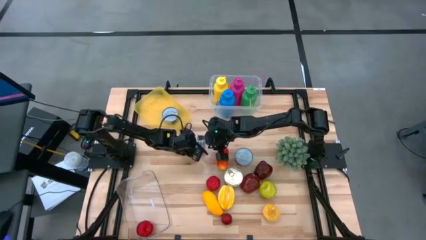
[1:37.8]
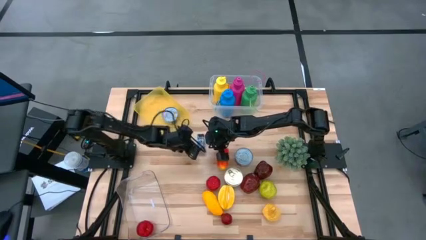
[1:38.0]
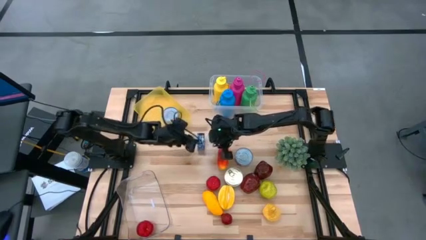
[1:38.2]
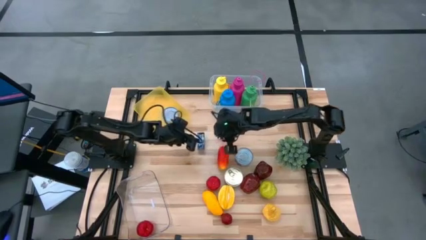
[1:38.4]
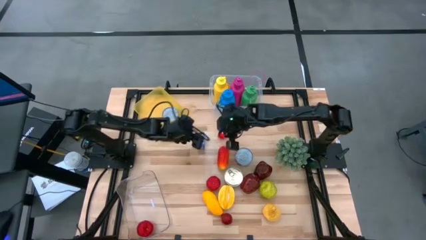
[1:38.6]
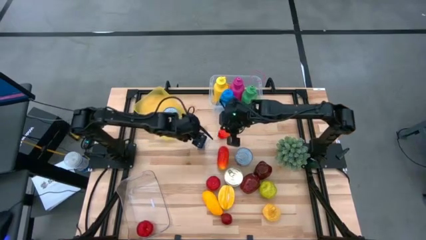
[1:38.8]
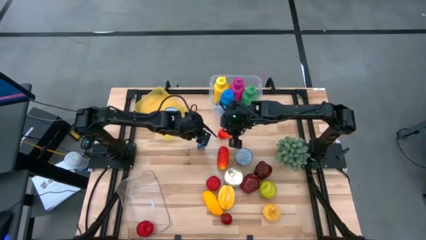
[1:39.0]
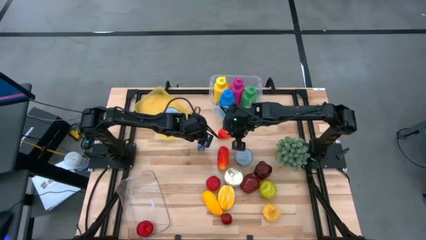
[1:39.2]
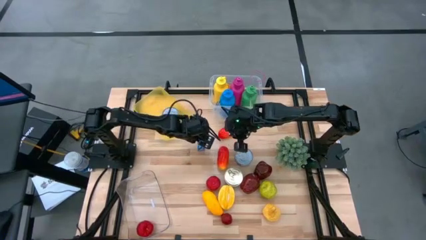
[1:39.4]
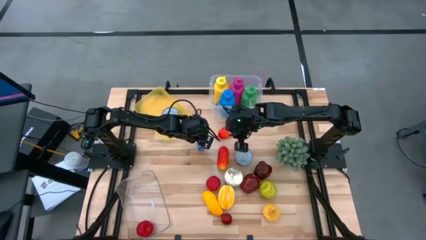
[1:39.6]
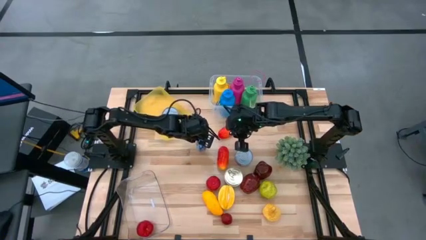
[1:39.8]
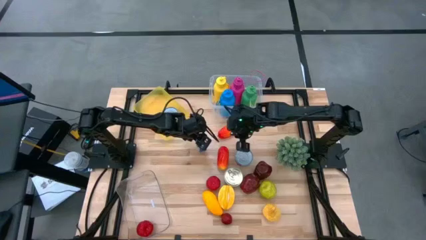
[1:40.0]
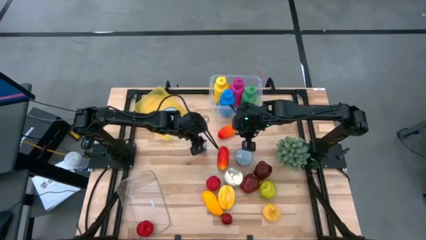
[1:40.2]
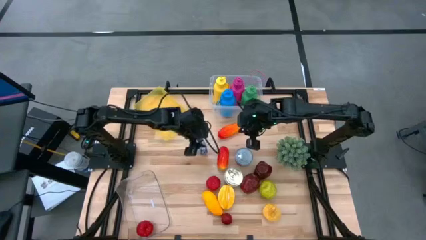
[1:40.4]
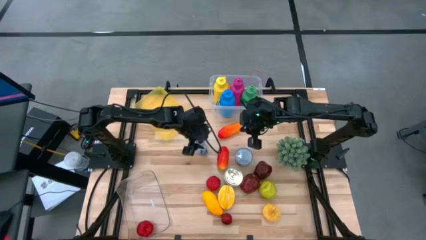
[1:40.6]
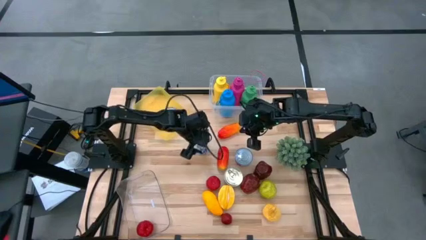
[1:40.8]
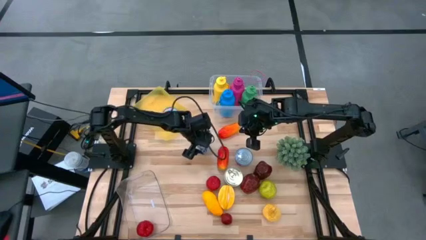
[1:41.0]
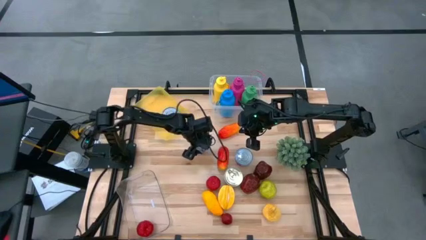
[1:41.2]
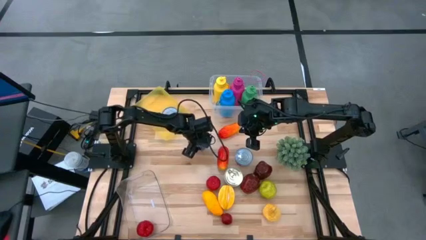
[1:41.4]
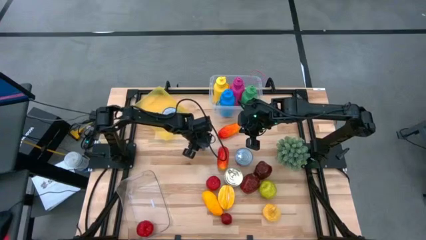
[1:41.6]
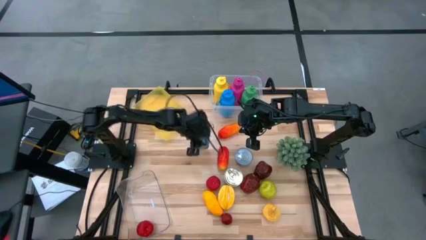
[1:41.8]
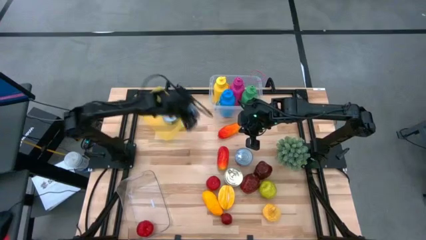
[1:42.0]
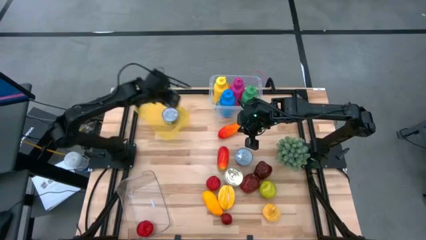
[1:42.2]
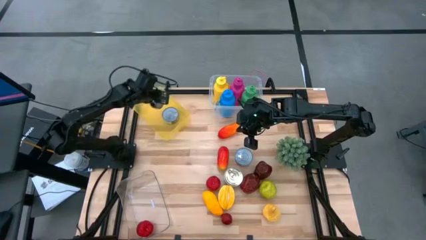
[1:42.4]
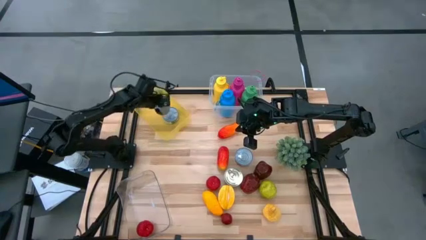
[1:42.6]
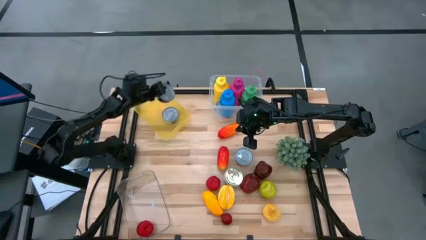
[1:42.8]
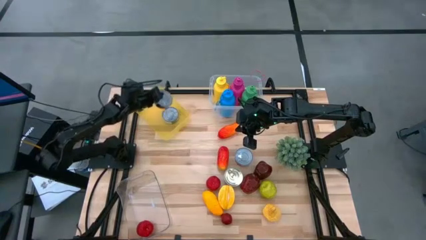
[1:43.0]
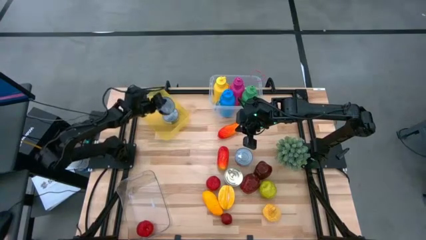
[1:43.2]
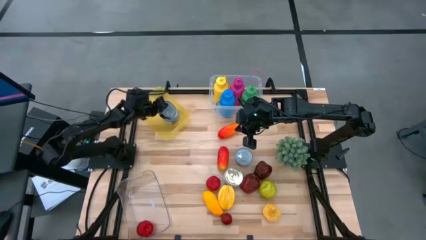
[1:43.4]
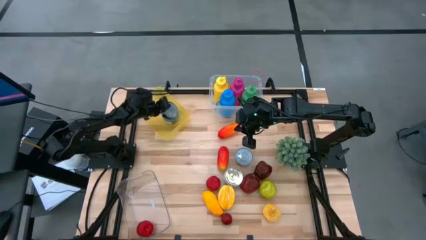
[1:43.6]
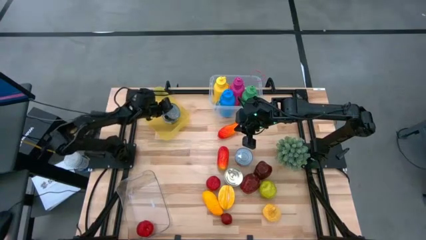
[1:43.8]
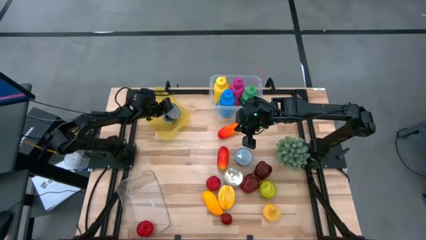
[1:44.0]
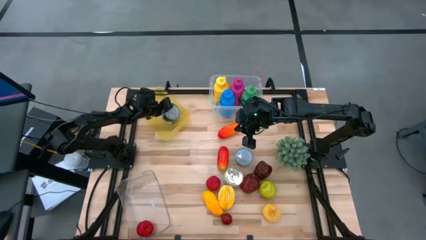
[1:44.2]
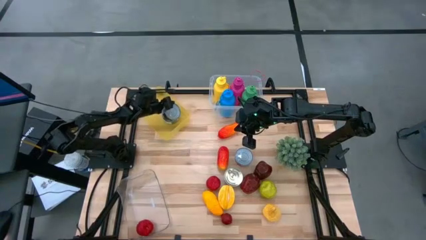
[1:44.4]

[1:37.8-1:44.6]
Task: Pick & Place Food Item
Put the blue tuna can into the yellow bin

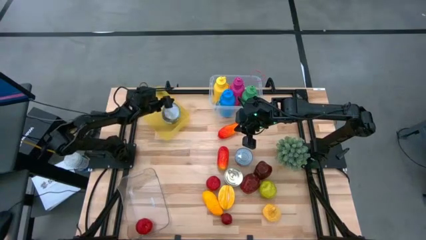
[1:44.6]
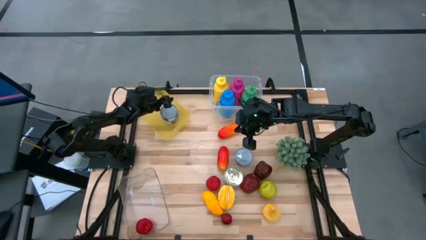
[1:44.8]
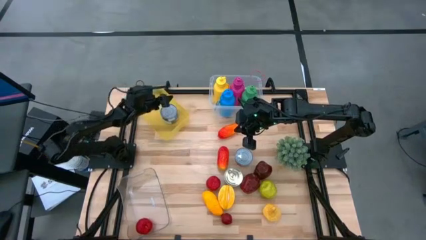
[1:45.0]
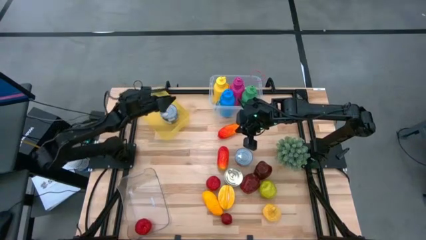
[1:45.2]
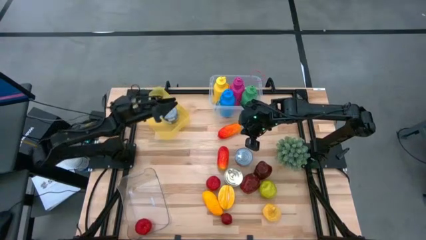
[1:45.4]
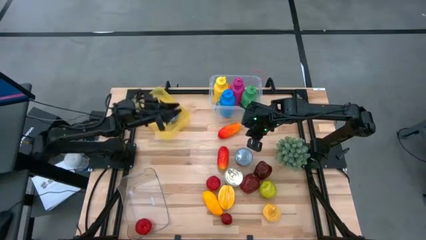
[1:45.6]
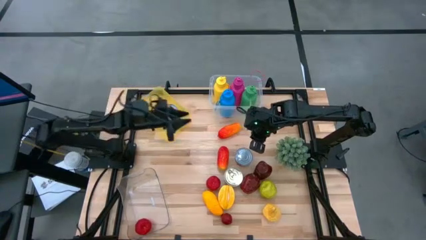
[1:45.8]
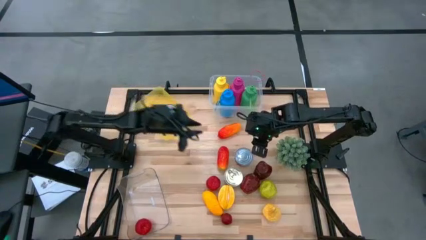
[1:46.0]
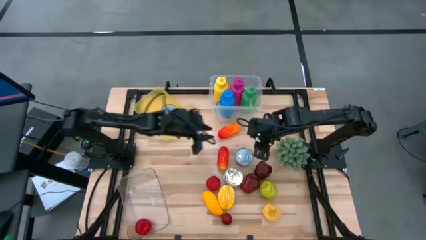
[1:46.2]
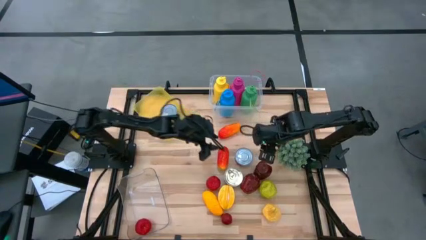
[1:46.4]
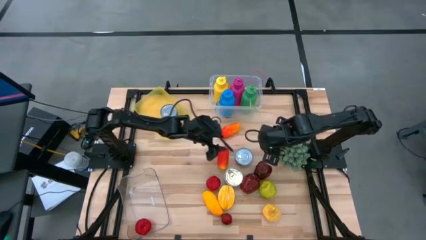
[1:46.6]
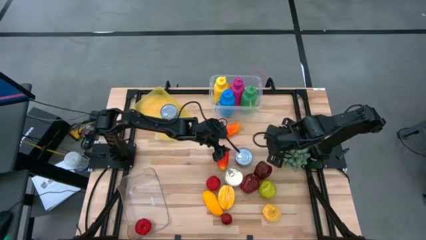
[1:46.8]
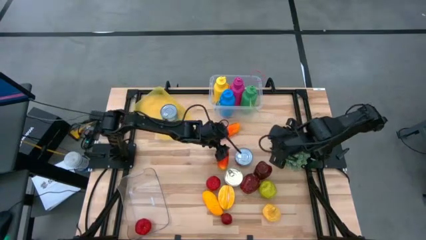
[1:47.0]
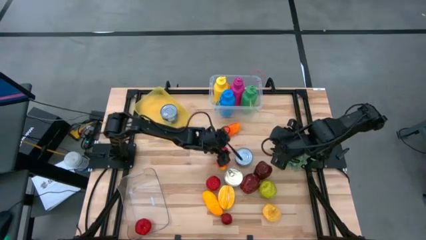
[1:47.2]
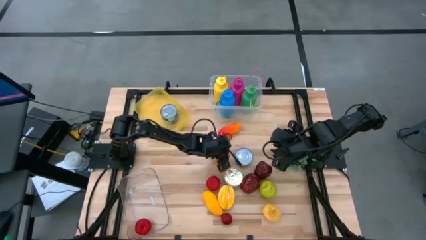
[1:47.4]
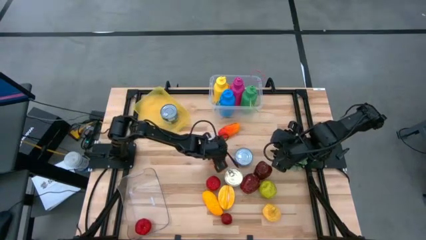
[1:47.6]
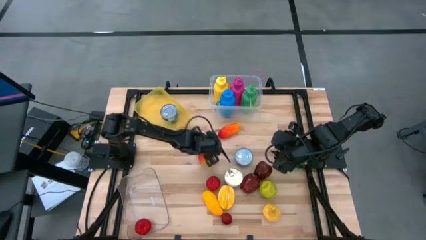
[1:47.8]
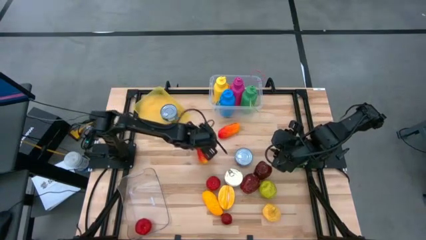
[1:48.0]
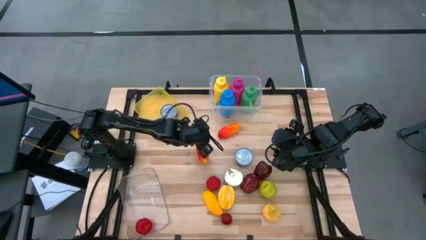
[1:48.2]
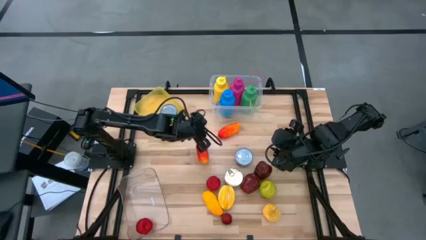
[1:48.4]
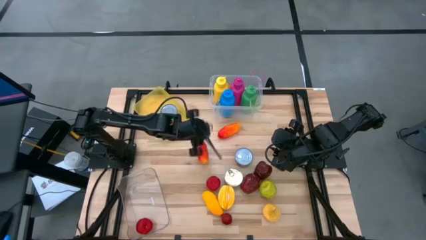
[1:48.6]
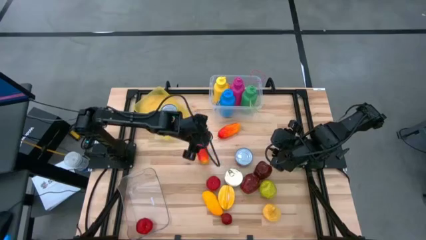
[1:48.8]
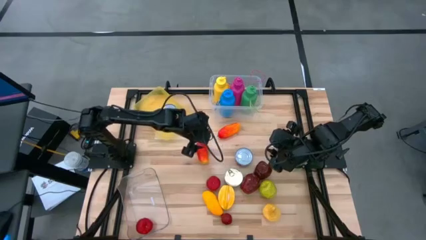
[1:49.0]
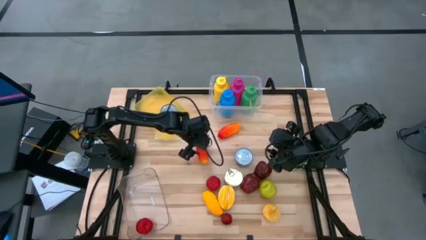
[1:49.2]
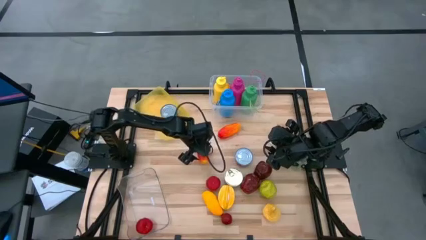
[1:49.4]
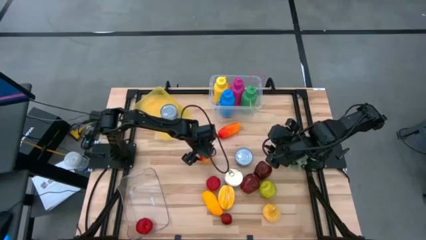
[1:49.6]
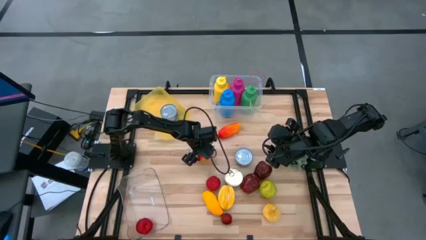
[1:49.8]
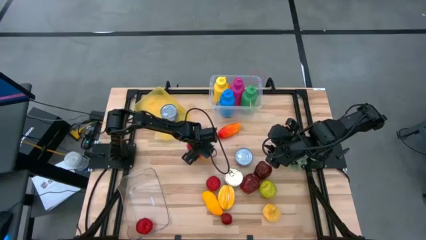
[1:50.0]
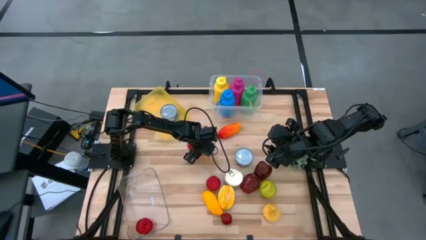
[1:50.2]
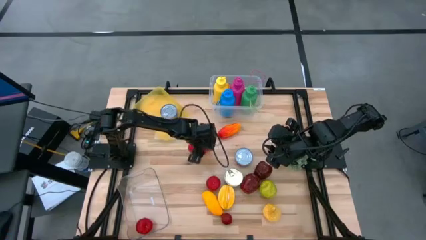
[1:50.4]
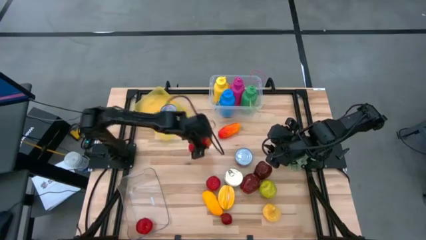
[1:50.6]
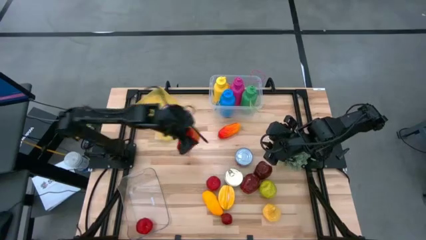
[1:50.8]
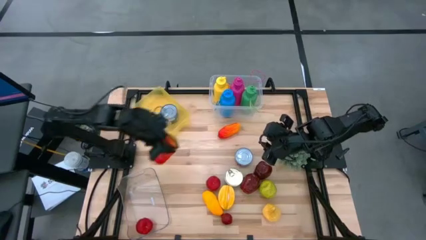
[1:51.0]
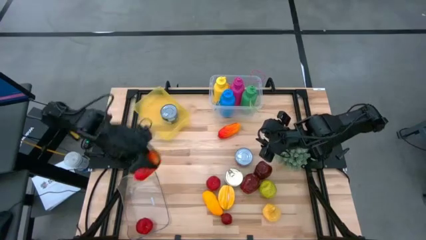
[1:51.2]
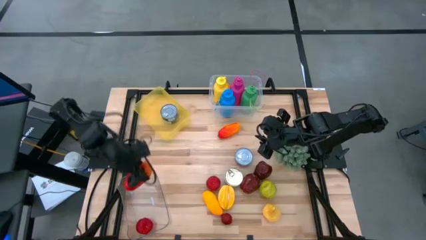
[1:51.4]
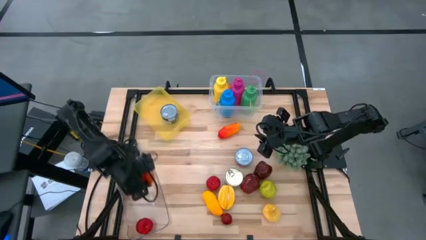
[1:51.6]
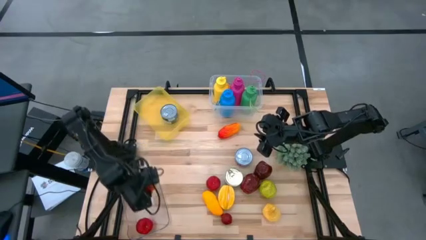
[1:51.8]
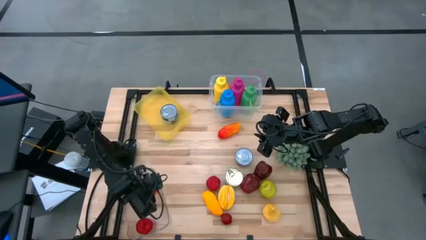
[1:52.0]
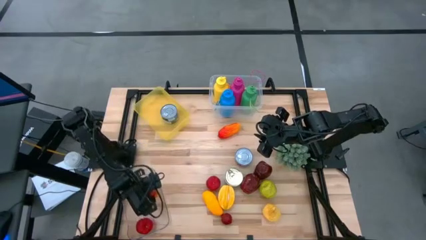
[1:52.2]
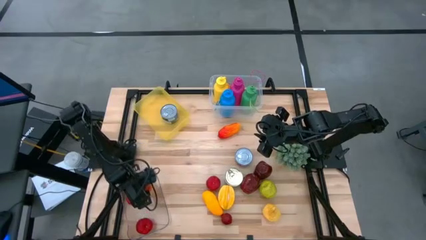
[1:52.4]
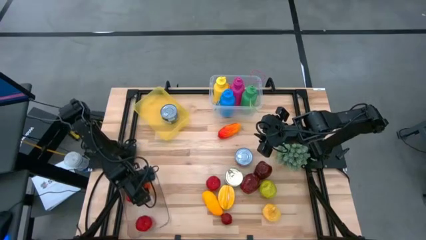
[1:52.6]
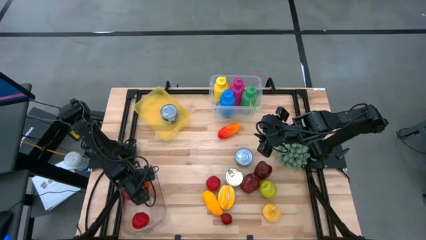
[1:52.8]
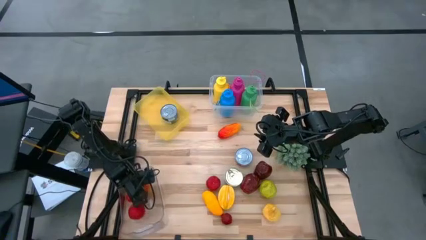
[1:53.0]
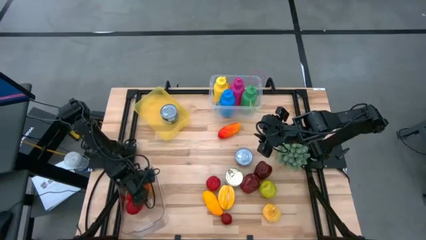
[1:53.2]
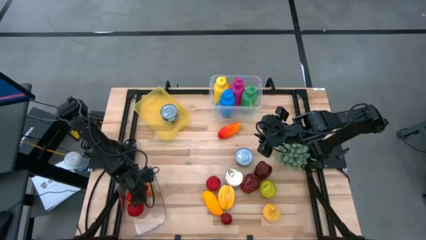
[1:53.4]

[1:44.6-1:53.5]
Put the bottom red mango into the transparent bin
